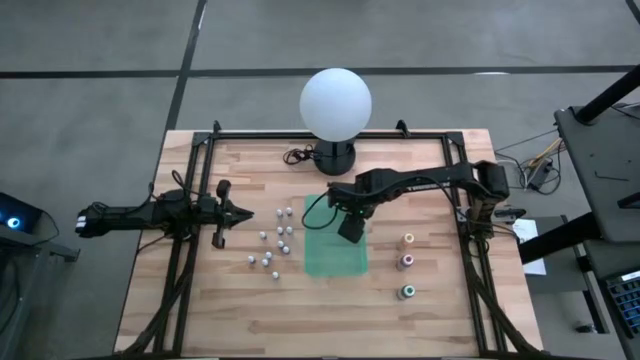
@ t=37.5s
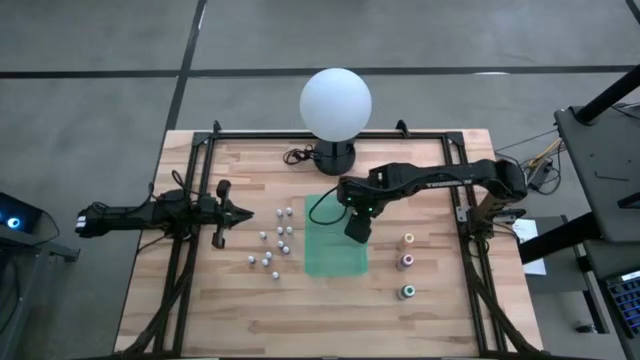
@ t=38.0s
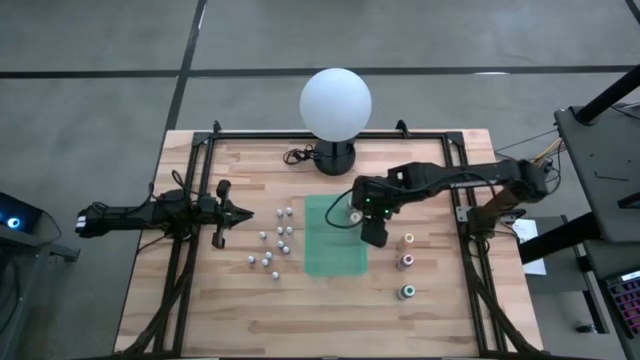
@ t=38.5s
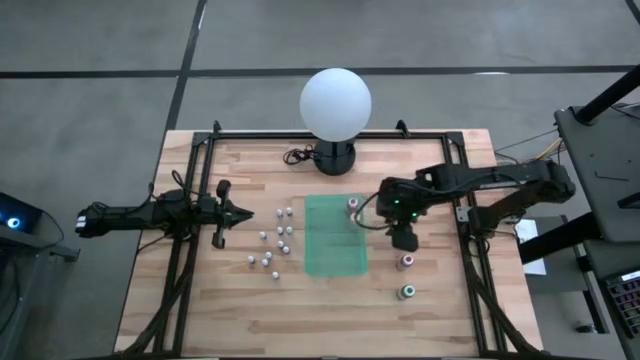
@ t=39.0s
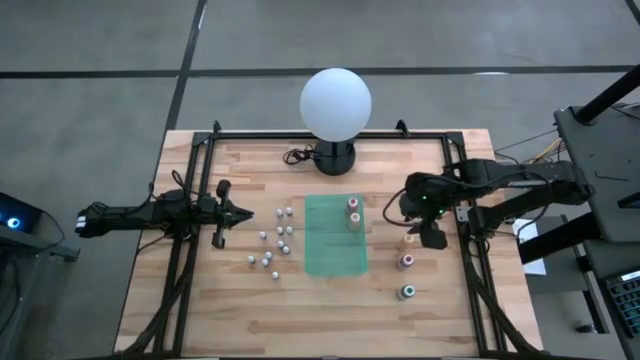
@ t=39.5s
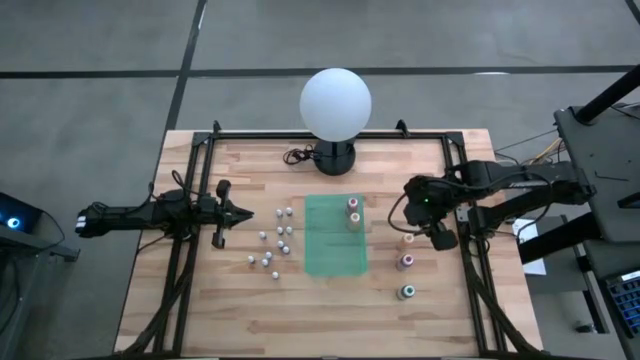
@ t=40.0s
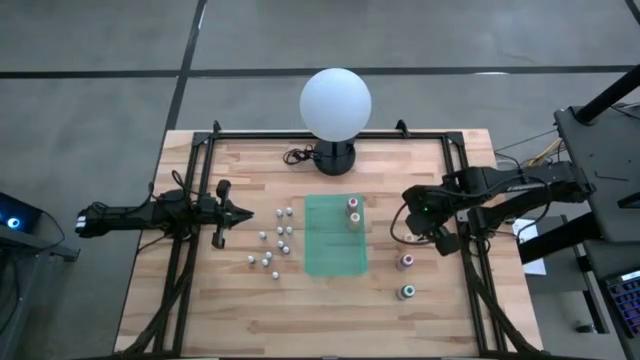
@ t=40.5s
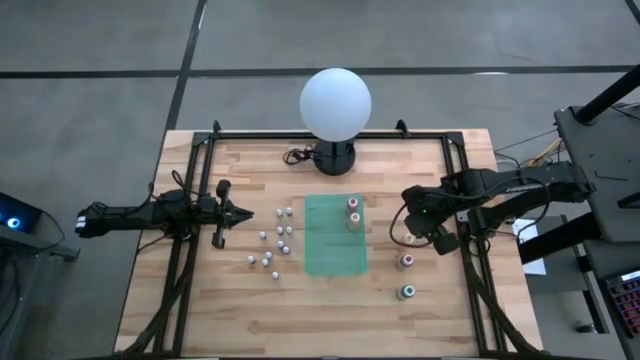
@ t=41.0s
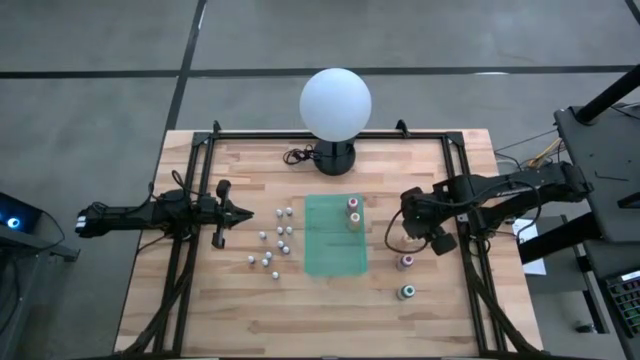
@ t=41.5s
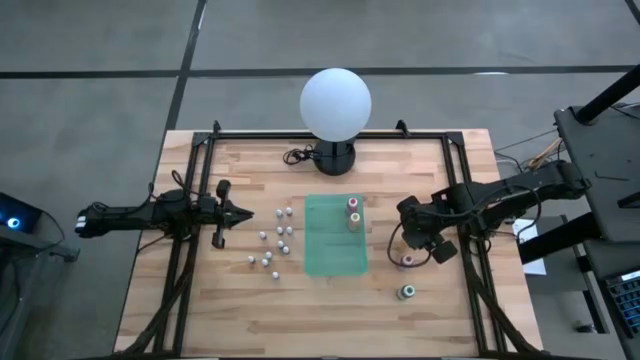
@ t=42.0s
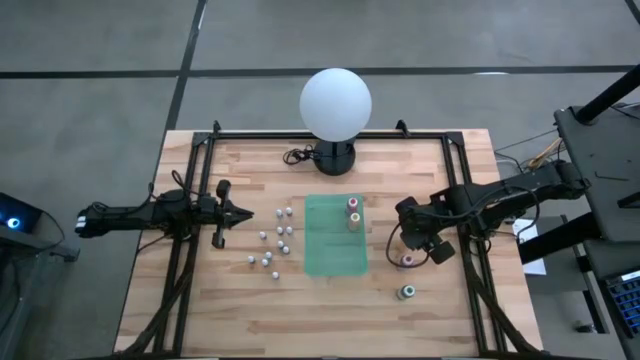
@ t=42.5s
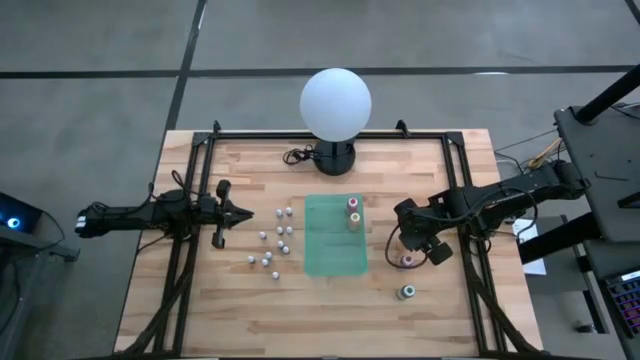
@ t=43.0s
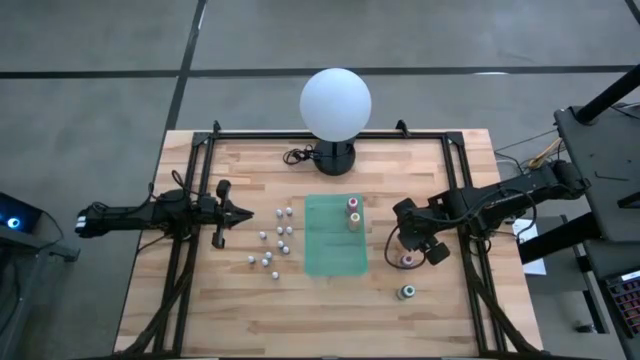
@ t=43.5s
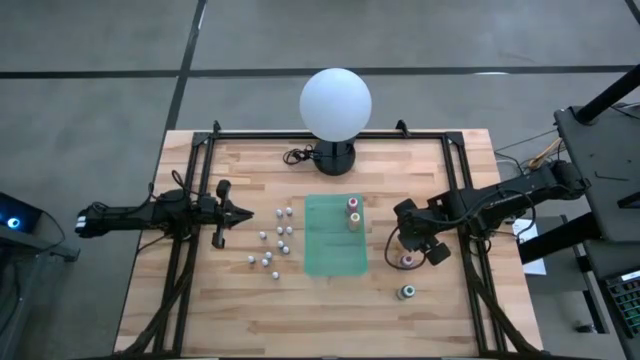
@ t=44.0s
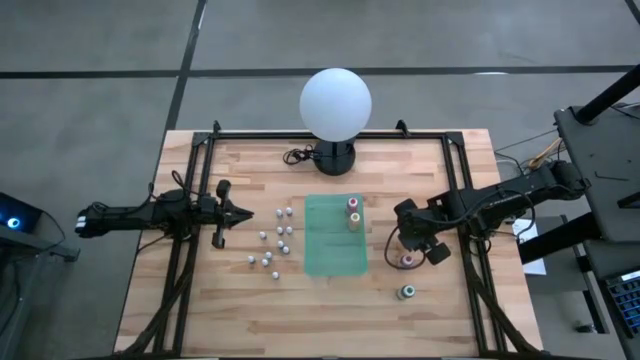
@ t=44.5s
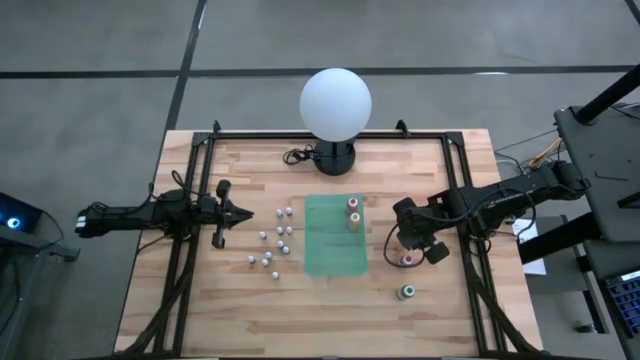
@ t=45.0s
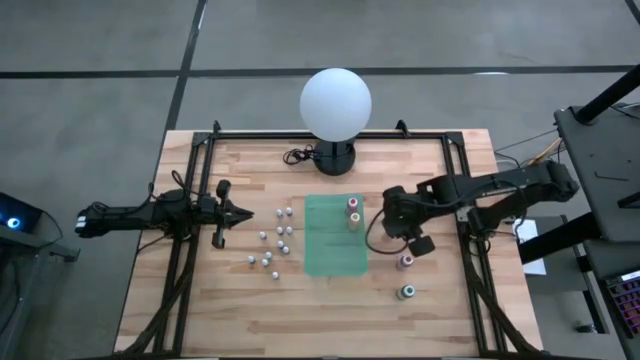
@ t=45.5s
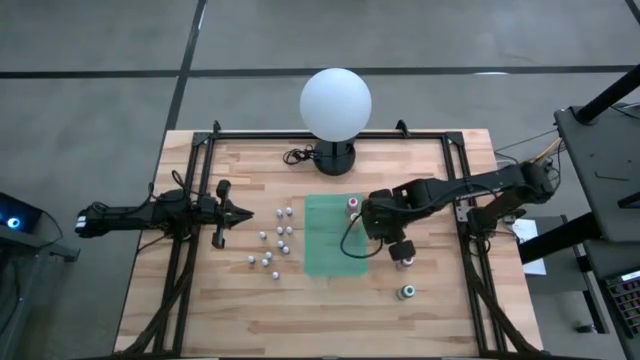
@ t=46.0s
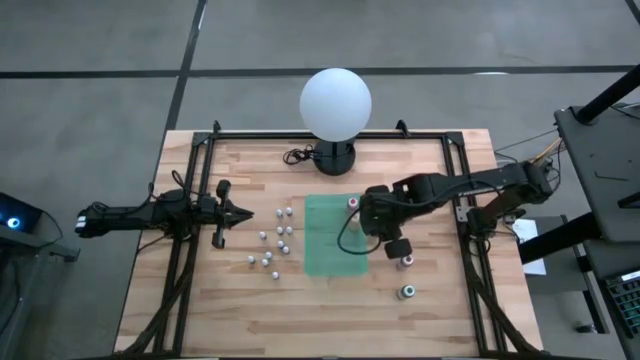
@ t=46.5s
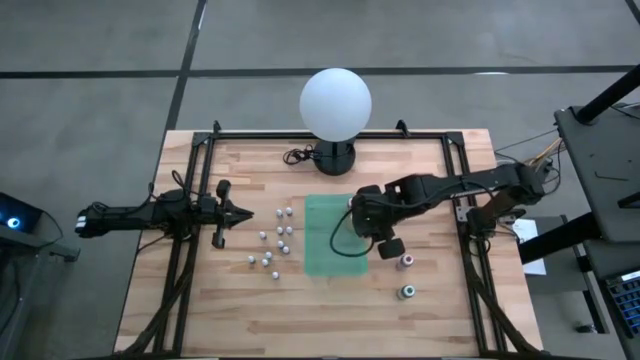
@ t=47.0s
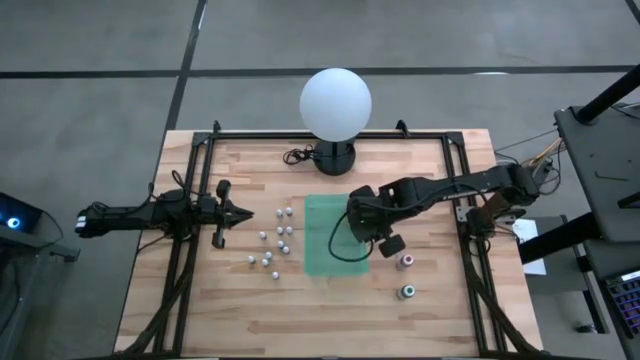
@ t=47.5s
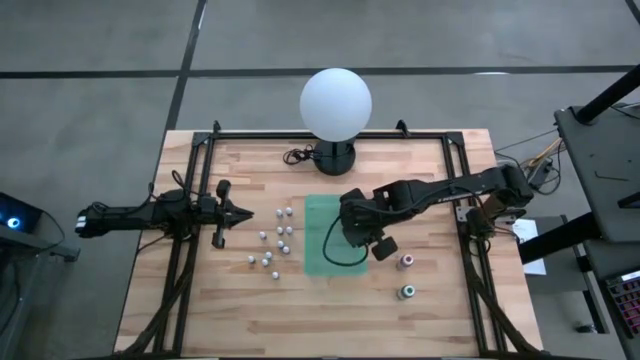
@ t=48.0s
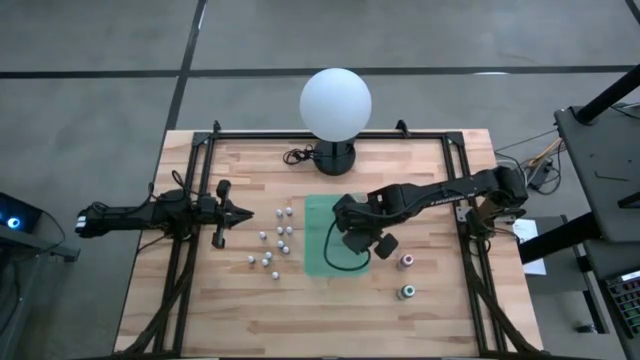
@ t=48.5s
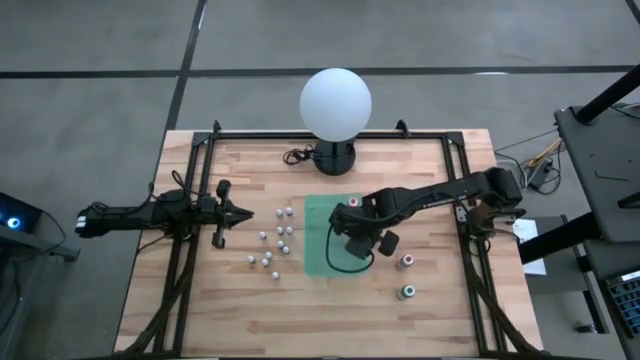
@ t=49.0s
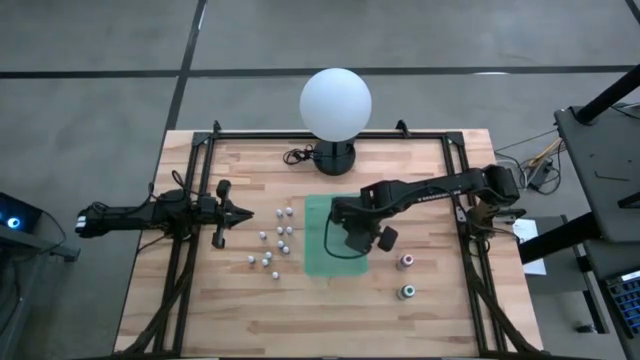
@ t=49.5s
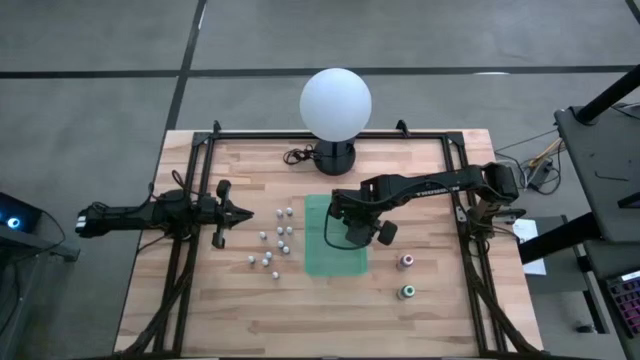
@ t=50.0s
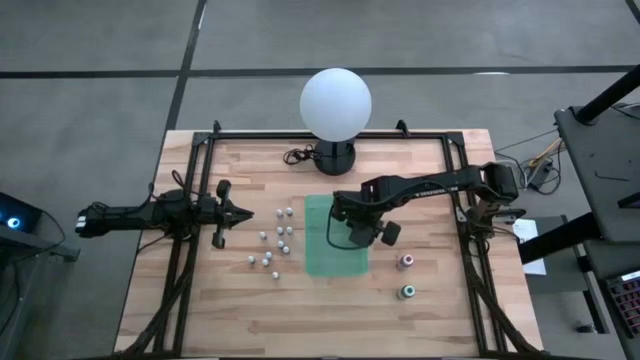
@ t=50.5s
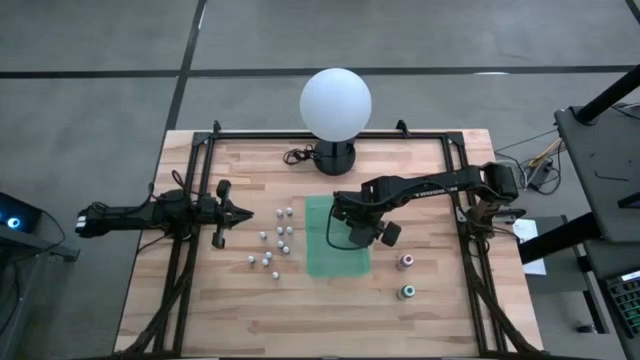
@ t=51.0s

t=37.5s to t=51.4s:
Task: Pick & Place food coloring
Put the large yellow food coloring bottle into the green bin

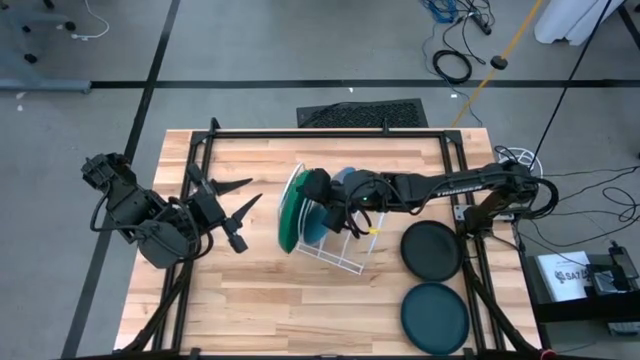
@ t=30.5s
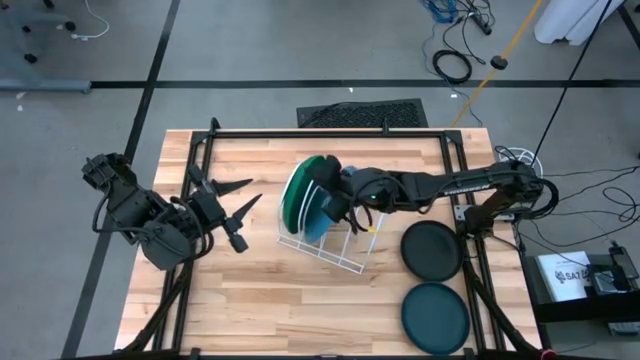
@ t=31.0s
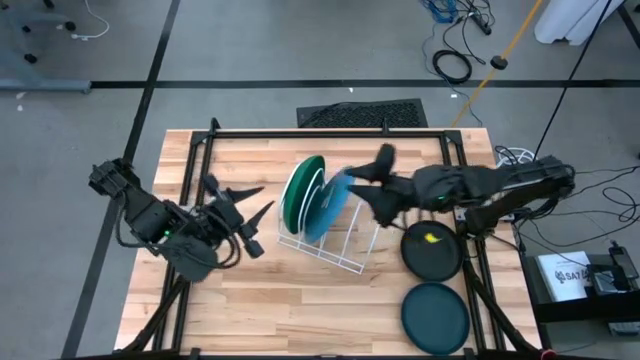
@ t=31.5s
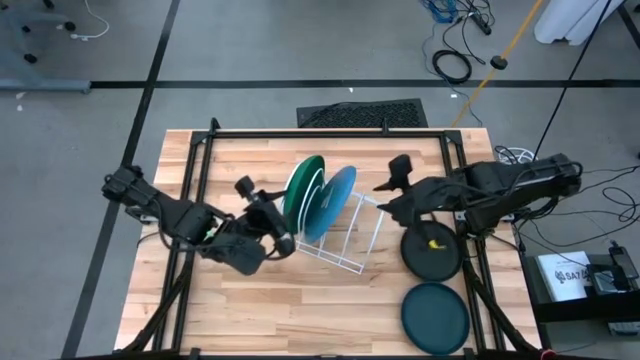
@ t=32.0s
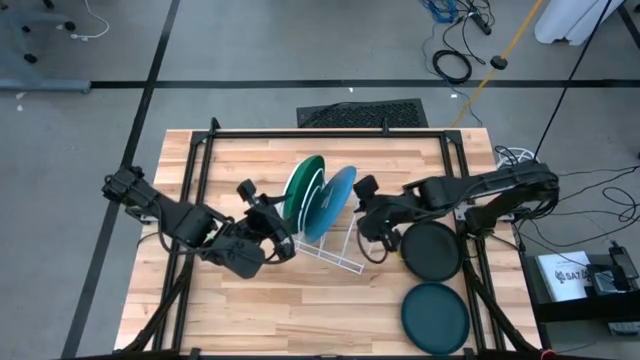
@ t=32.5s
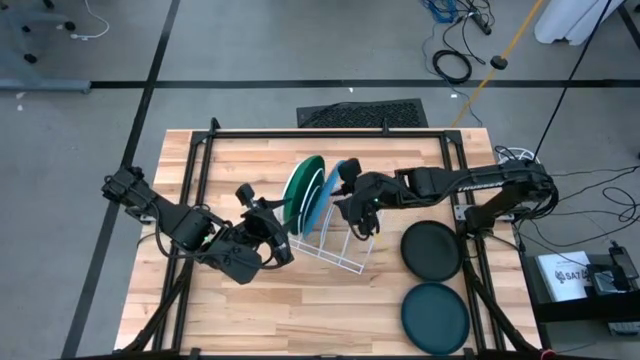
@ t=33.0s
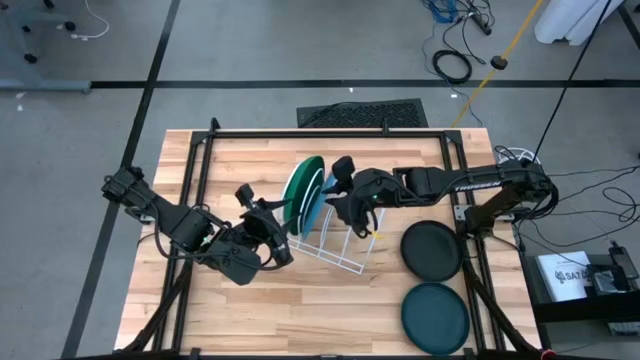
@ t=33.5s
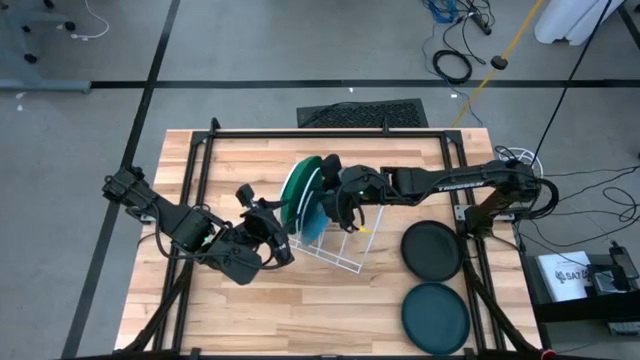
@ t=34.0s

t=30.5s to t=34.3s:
Task: Sort dishes
Adjust the blue plate in the dish rack
